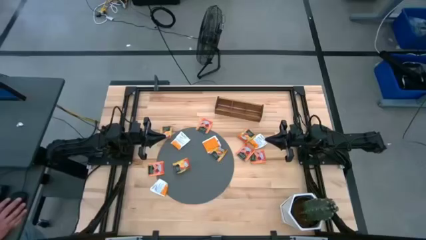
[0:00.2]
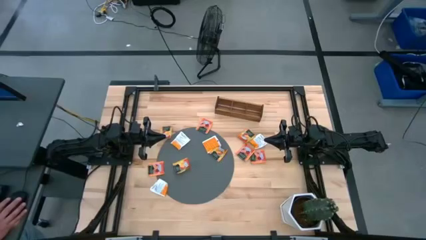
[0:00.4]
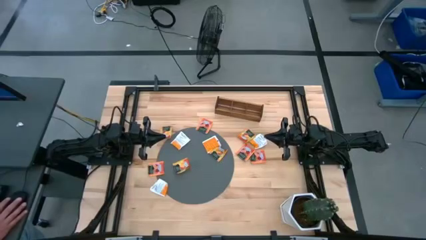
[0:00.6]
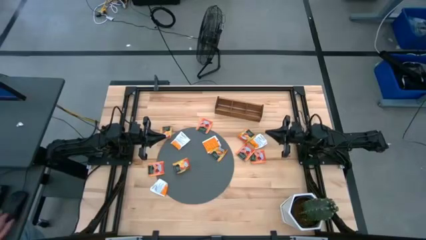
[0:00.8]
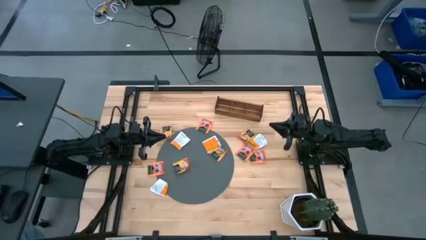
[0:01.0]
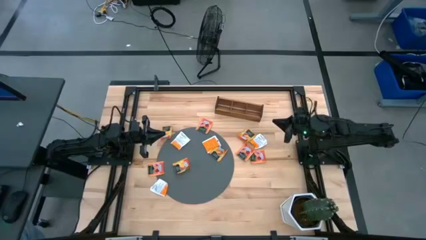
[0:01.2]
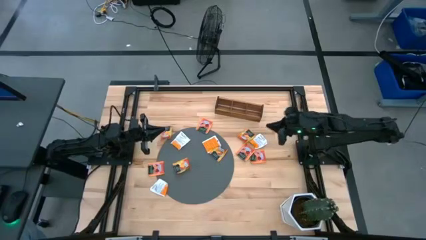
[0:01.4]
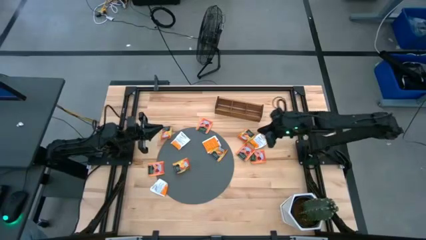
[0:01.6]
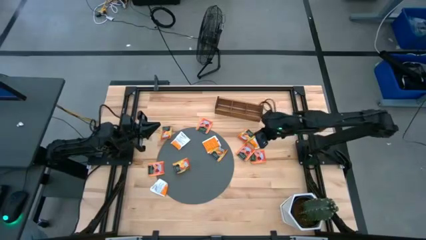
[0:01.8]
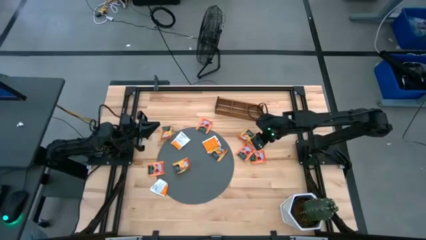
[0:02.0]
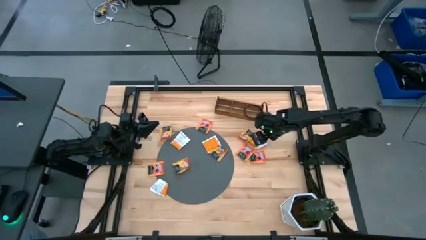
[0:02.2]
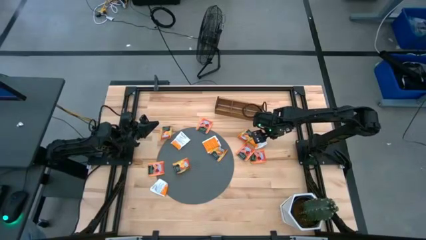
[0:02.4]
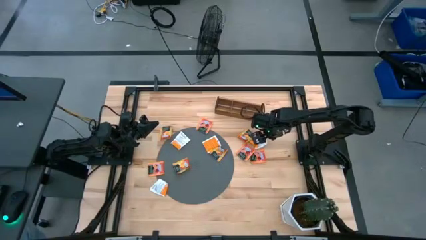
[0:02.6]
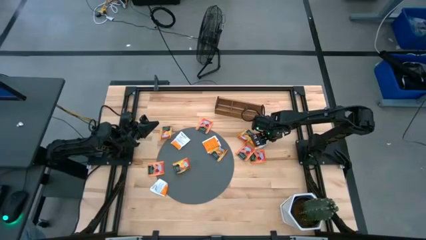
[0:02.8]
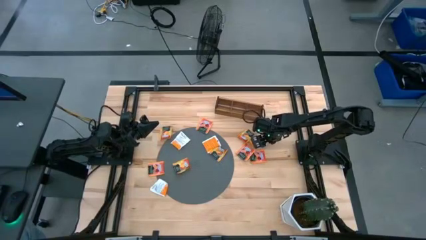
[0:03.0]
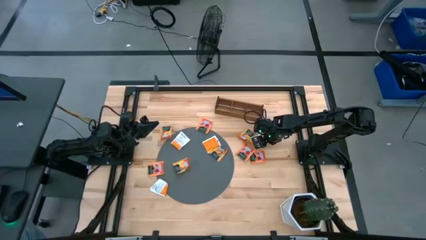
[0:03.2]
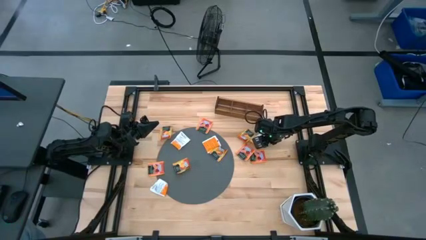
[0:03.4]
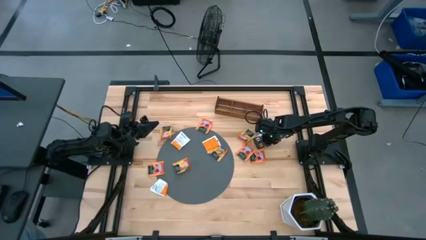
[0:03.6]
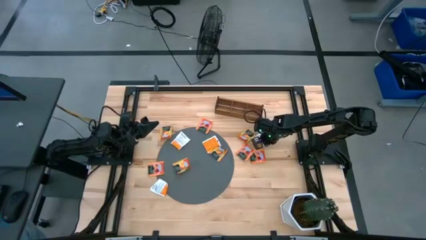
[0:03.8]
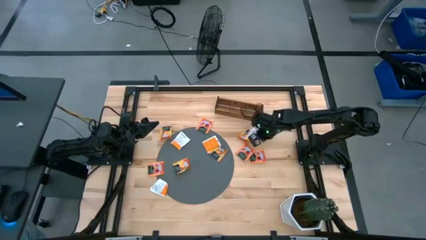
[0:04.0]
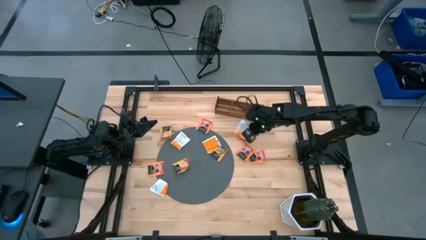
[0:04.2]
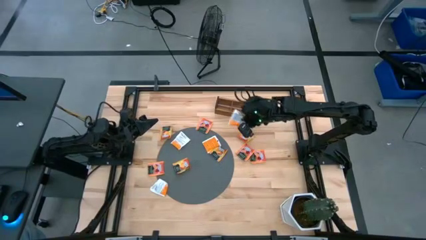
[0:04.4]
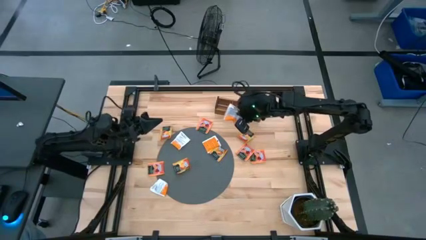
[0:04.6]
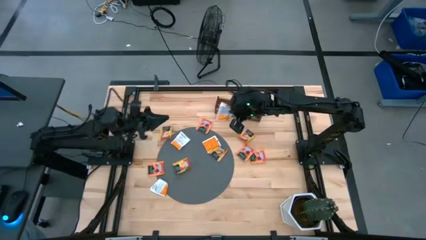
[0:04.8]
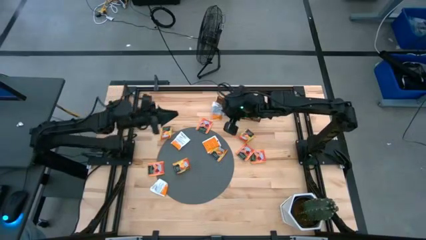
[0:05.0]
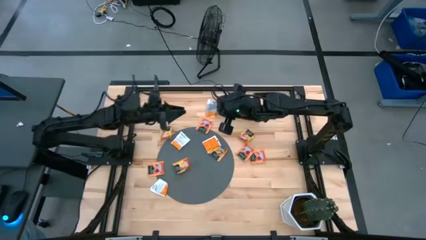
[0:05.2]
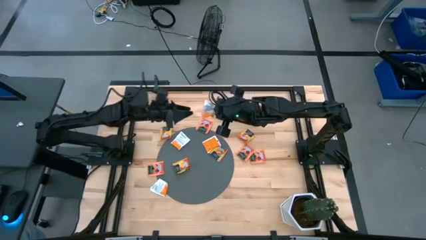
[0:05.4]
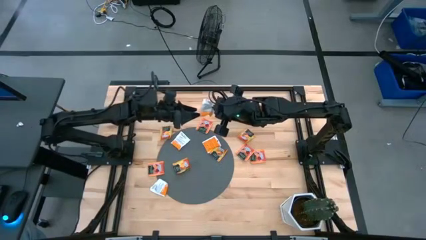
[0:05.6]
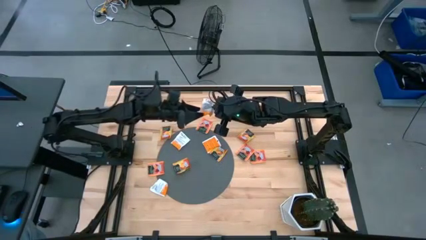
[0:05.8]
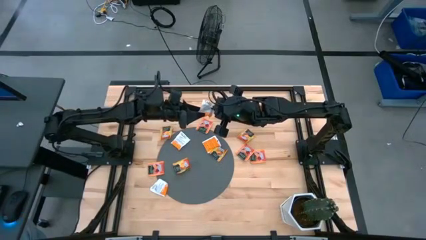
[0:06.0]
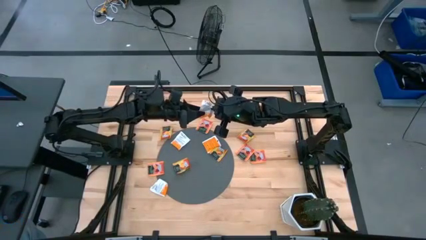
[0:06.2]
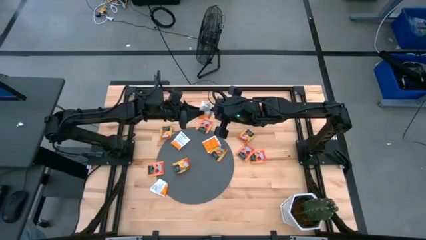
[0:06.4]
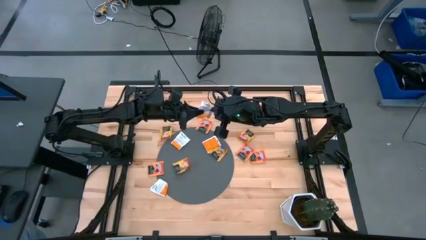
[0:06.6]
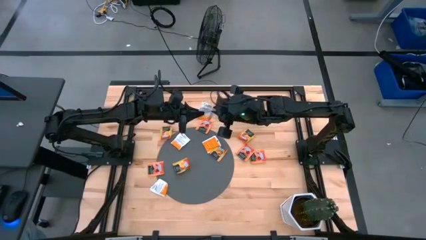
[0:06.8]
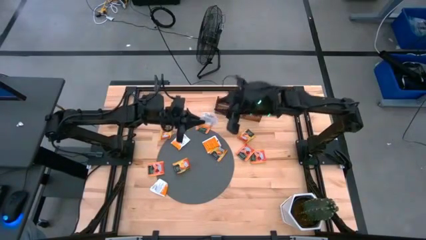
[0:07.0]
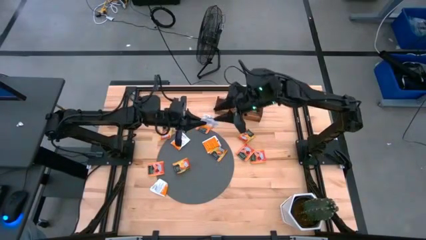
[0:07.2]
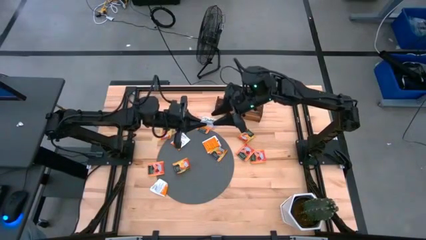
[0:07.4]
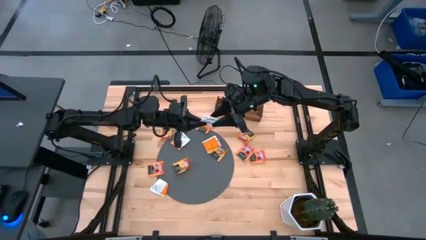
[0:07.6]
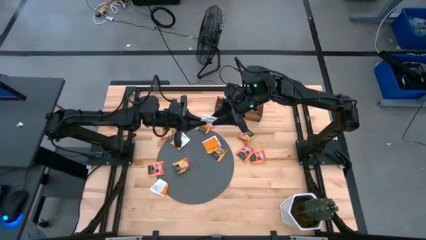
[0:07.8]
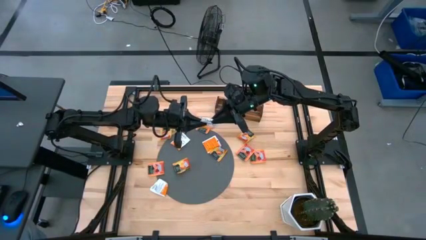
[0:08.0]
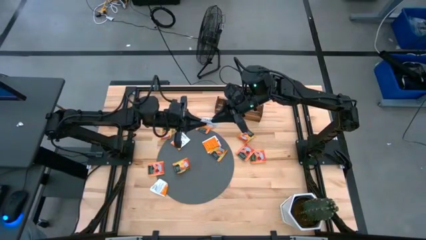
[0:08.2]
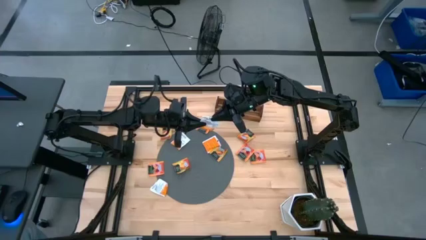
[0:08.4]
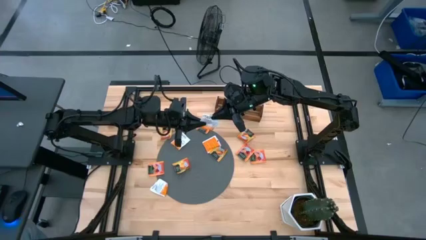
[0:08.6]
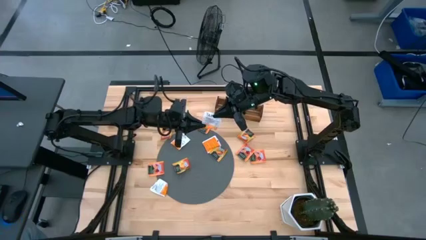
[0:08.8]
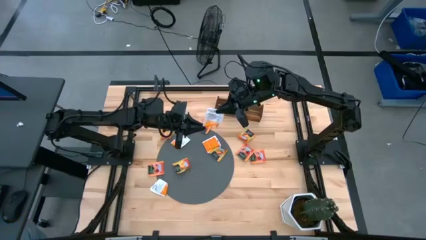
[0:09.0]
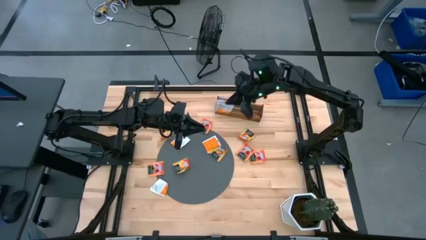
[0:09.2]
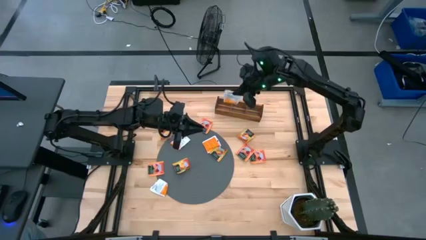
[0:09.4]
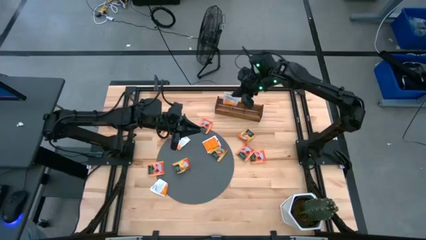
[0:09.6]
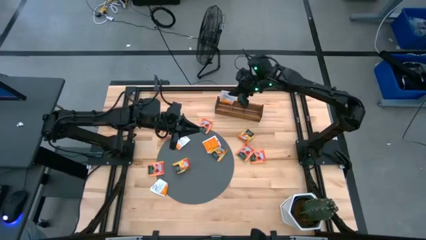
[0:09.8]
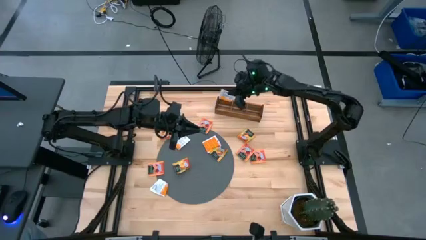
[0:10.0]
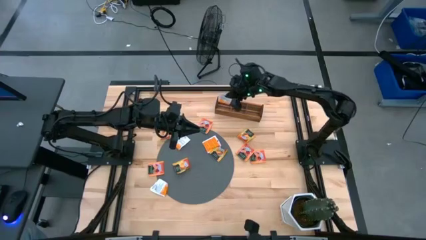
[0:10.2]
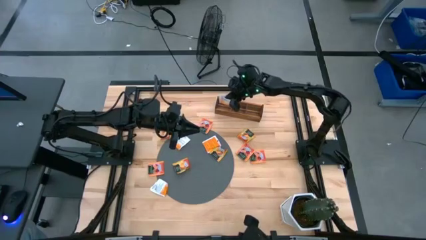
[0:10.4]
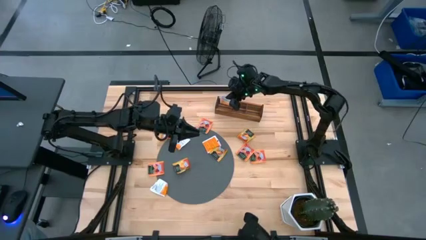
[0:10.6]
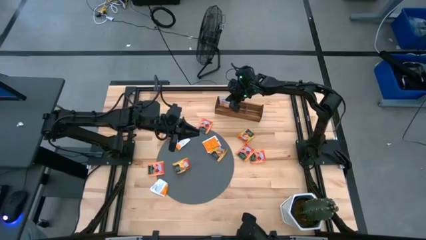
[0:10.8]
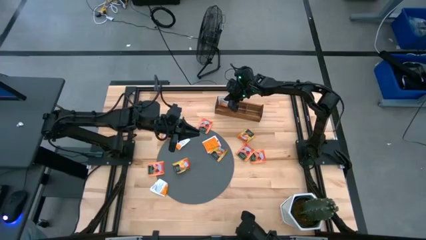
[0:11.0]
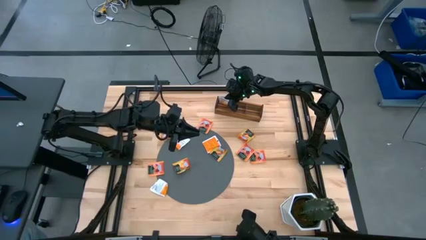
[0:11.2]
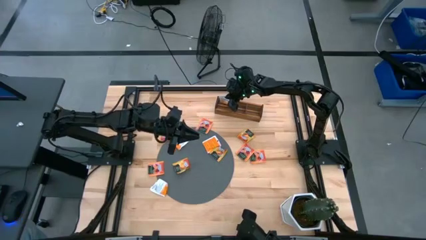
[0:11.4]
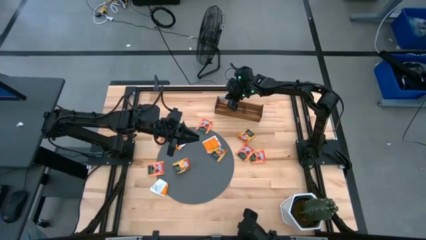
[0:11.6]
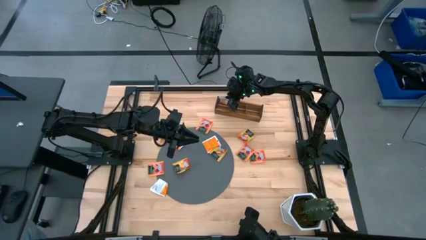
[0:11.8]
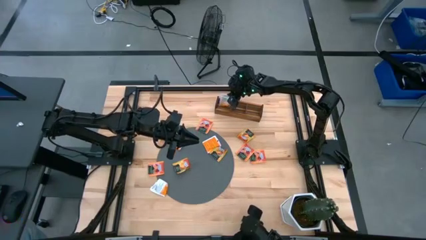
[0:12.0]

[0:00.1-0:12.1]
Task: Pick & Place Tea
Put the white tea bag into the left section of the wooden organizer
